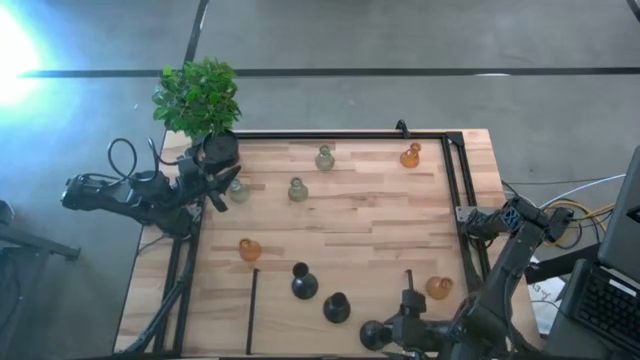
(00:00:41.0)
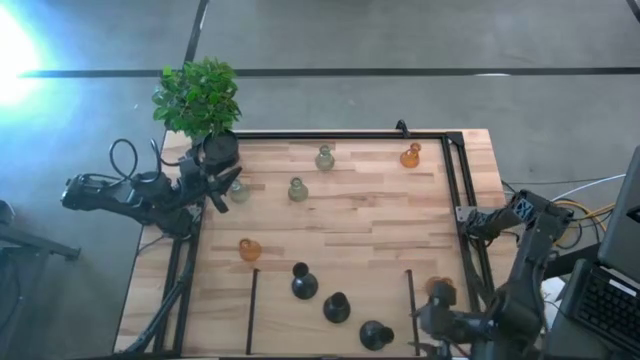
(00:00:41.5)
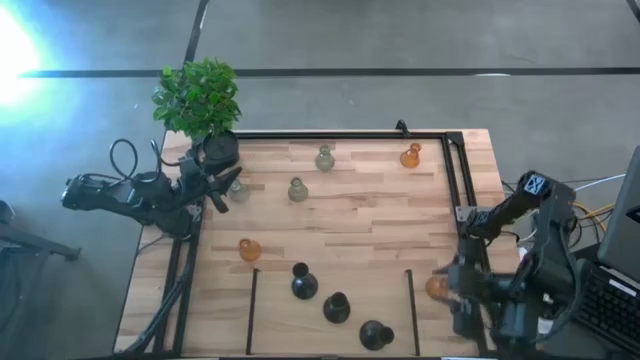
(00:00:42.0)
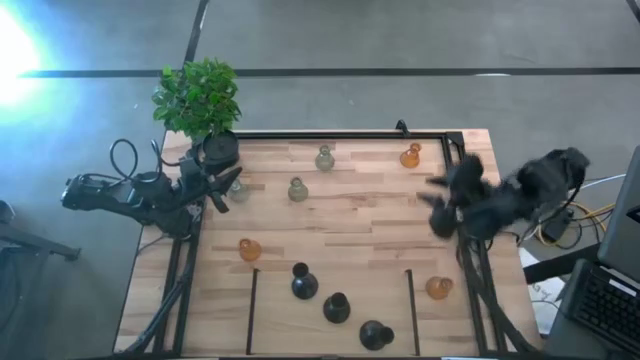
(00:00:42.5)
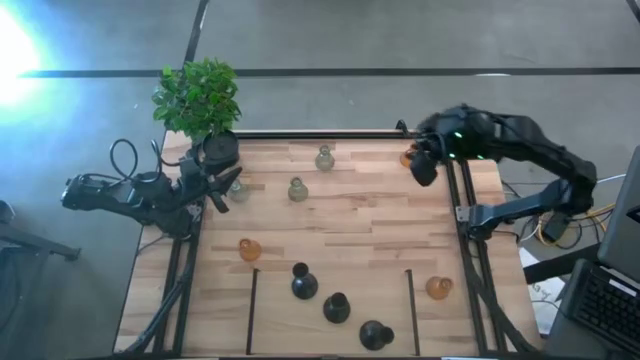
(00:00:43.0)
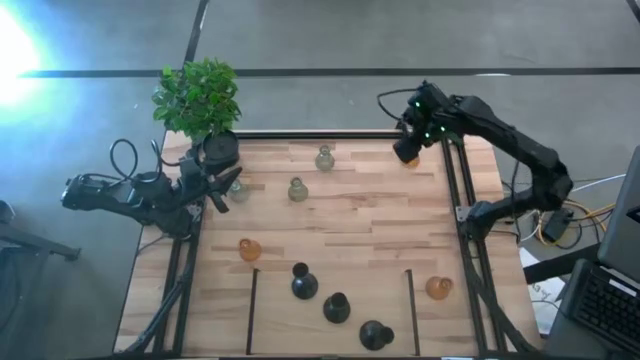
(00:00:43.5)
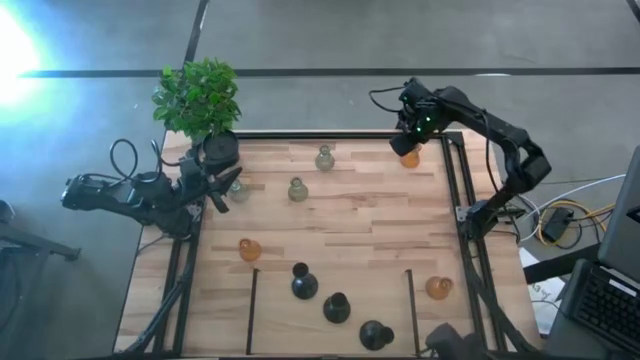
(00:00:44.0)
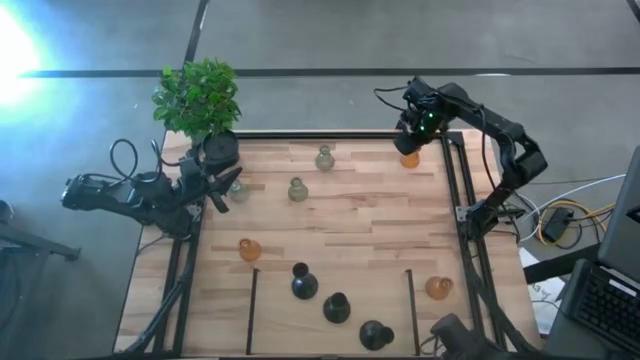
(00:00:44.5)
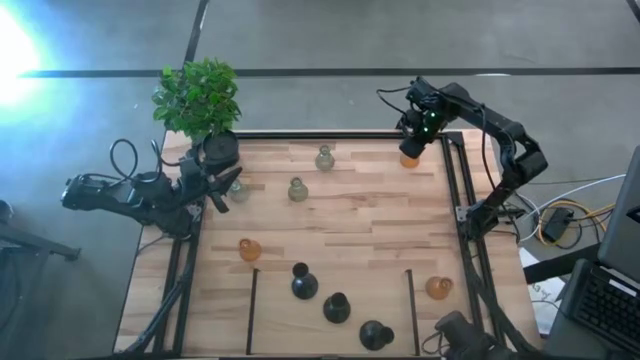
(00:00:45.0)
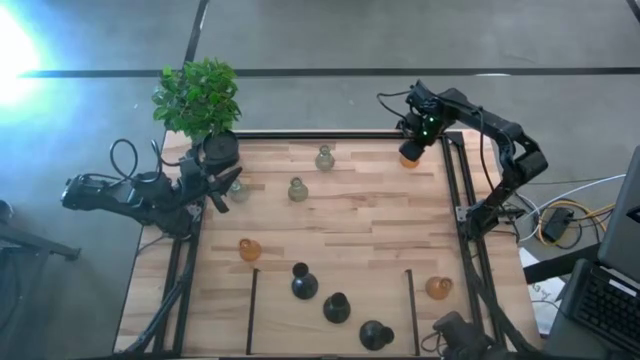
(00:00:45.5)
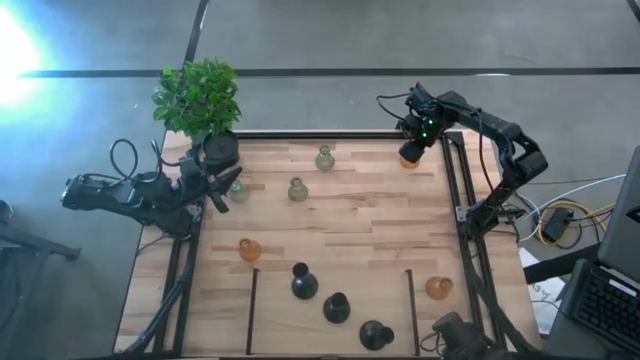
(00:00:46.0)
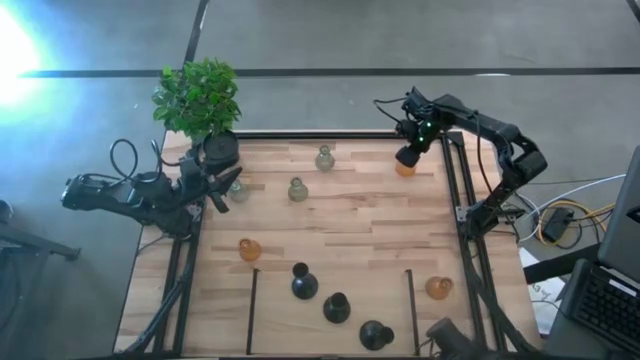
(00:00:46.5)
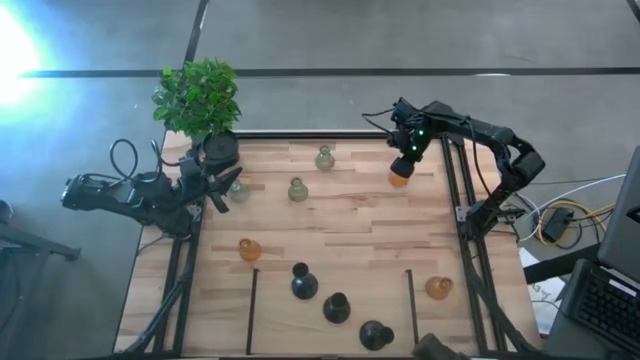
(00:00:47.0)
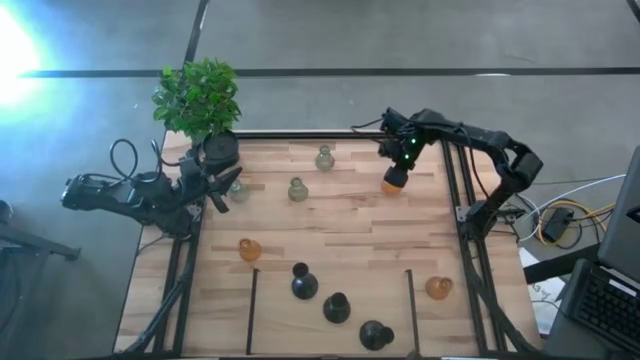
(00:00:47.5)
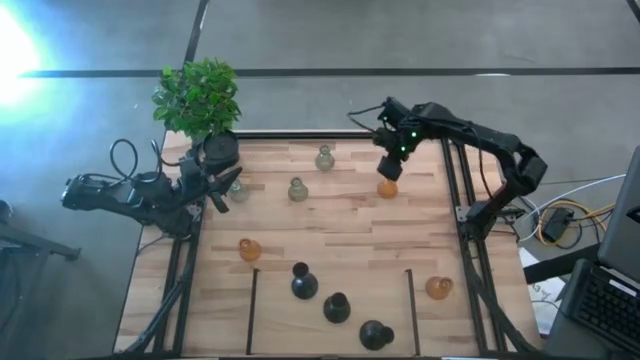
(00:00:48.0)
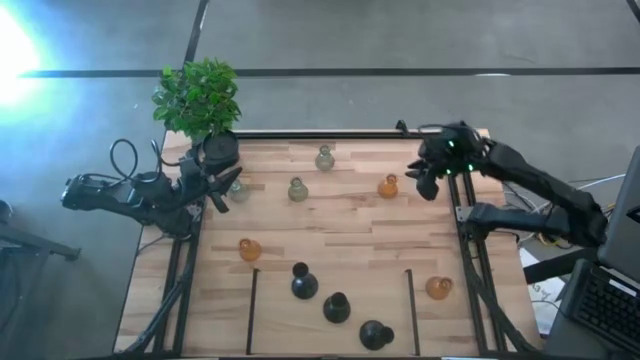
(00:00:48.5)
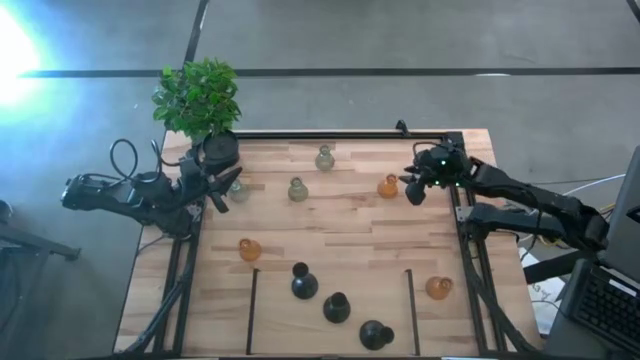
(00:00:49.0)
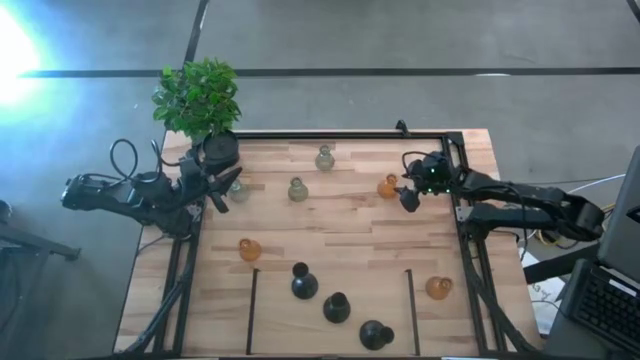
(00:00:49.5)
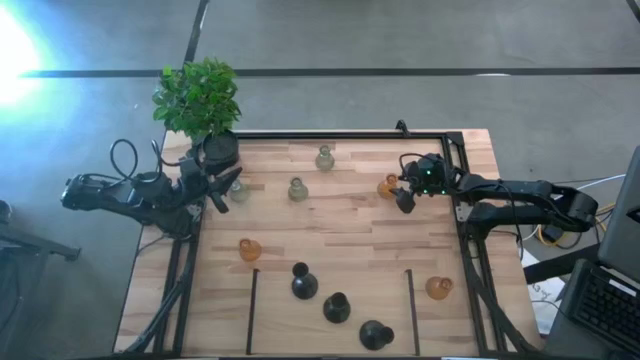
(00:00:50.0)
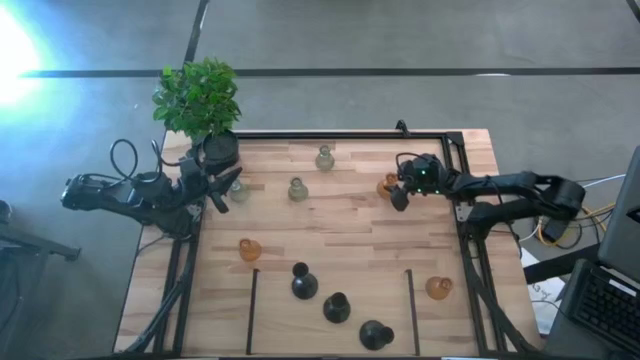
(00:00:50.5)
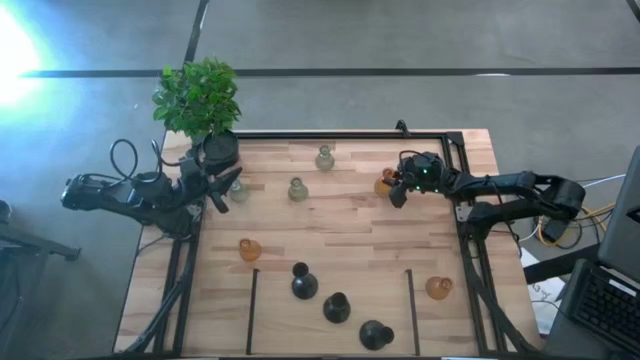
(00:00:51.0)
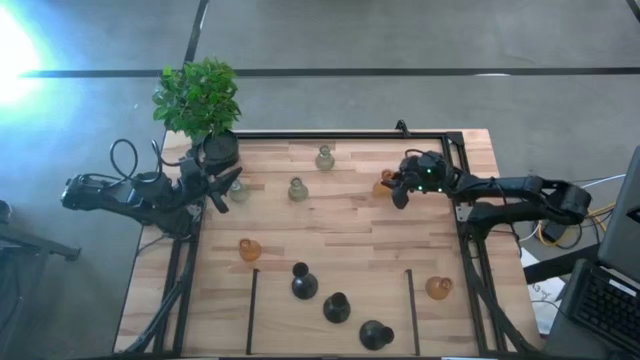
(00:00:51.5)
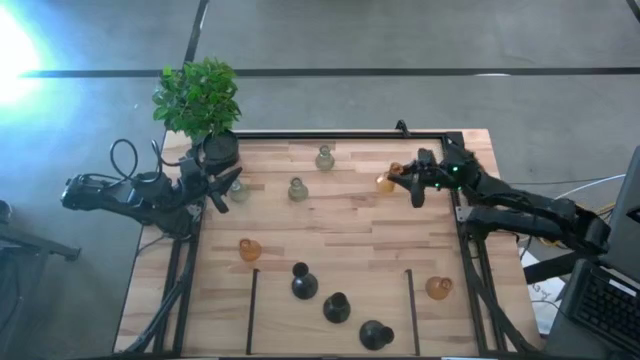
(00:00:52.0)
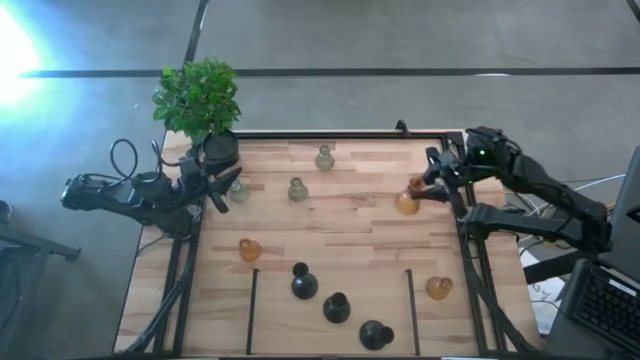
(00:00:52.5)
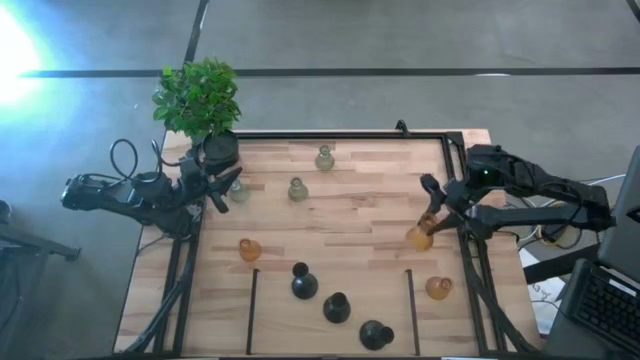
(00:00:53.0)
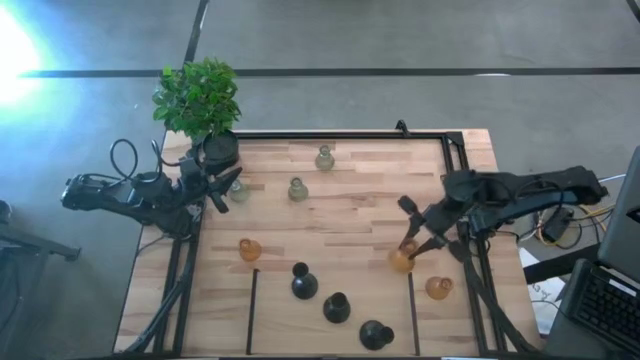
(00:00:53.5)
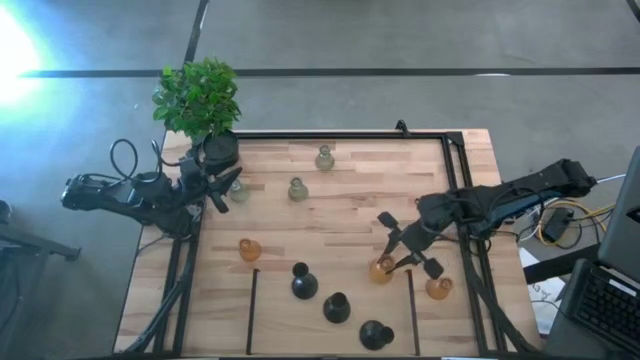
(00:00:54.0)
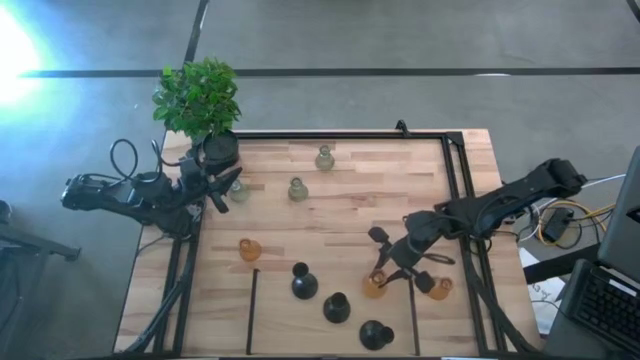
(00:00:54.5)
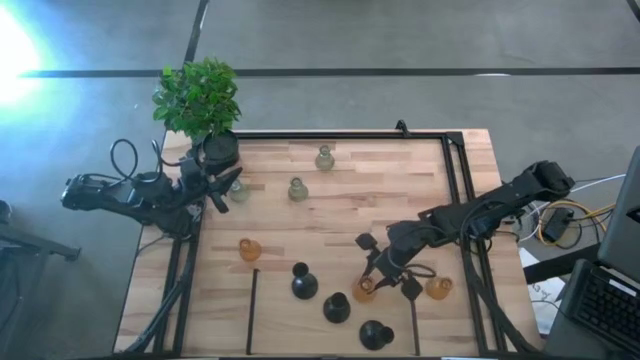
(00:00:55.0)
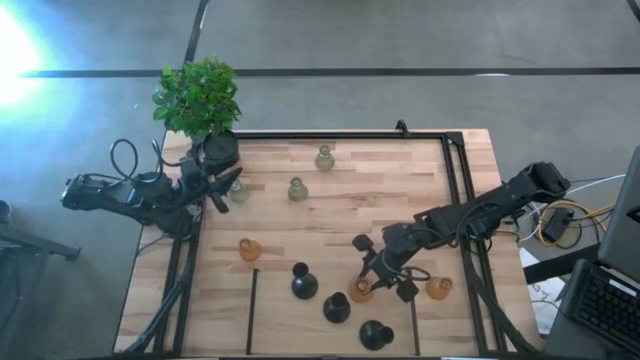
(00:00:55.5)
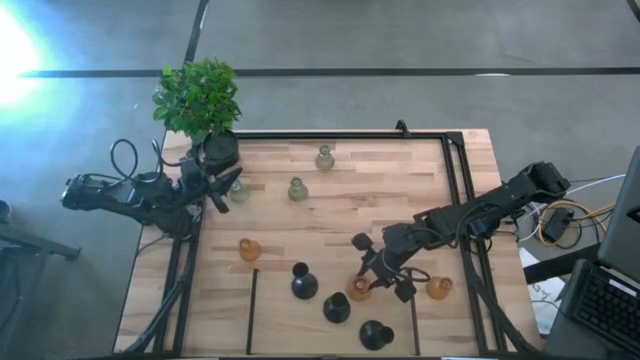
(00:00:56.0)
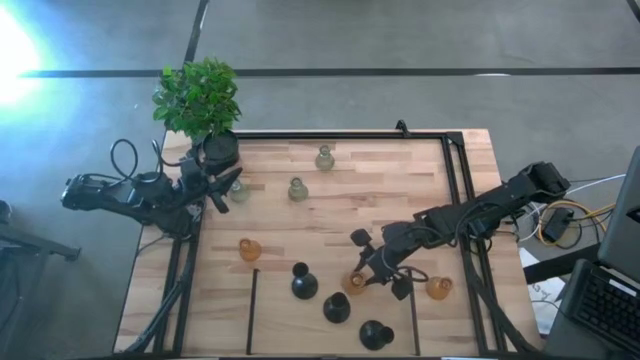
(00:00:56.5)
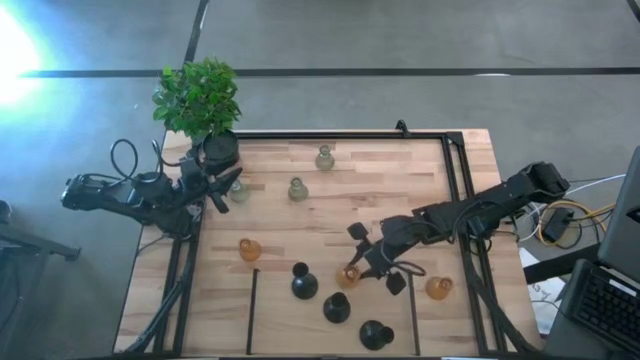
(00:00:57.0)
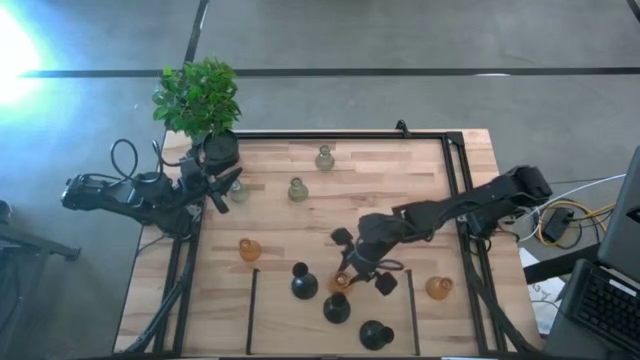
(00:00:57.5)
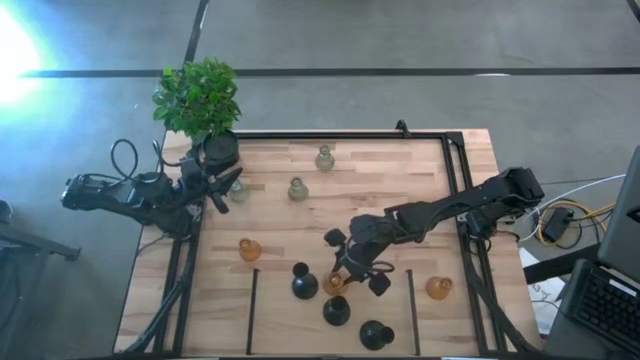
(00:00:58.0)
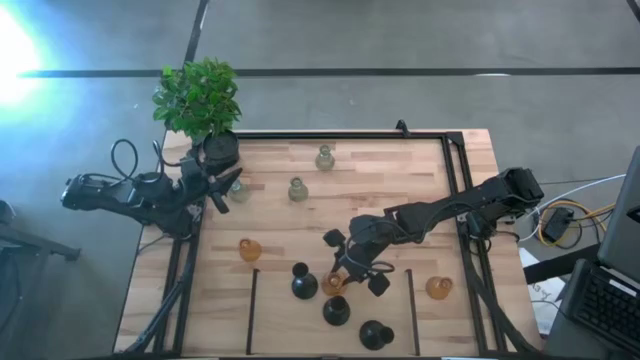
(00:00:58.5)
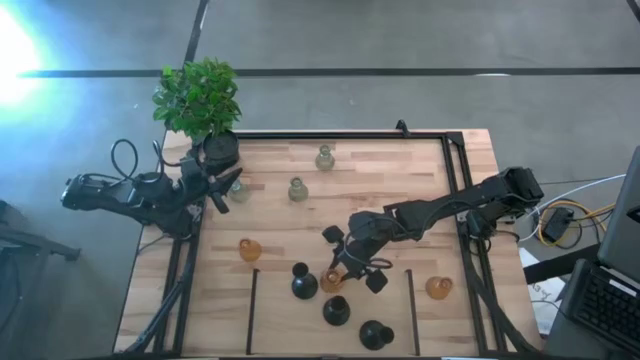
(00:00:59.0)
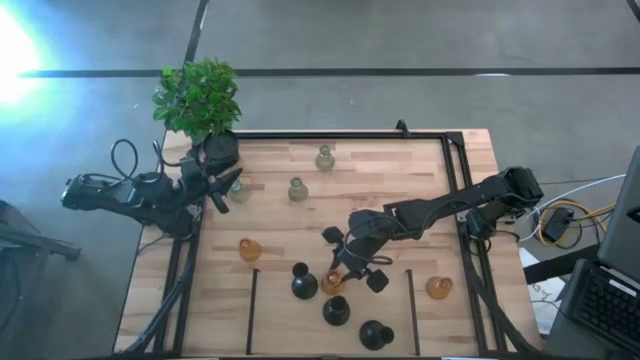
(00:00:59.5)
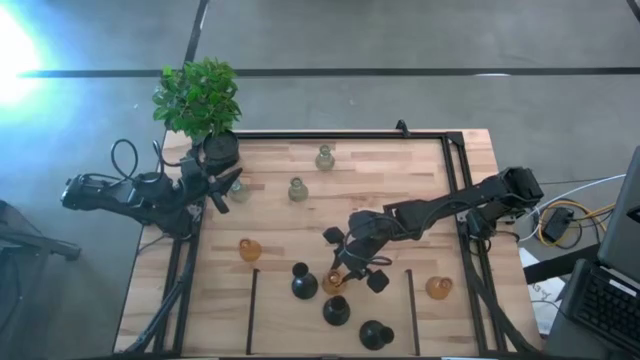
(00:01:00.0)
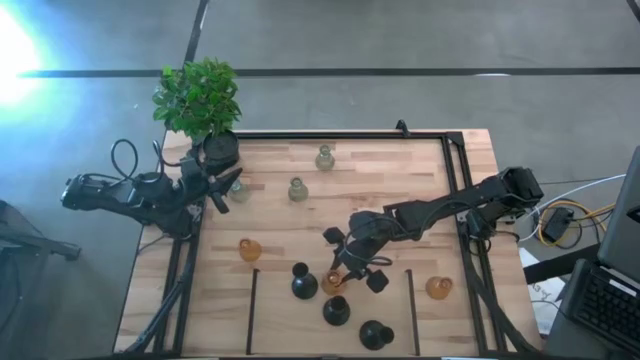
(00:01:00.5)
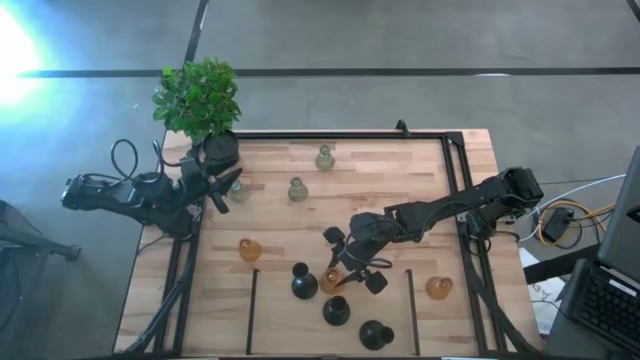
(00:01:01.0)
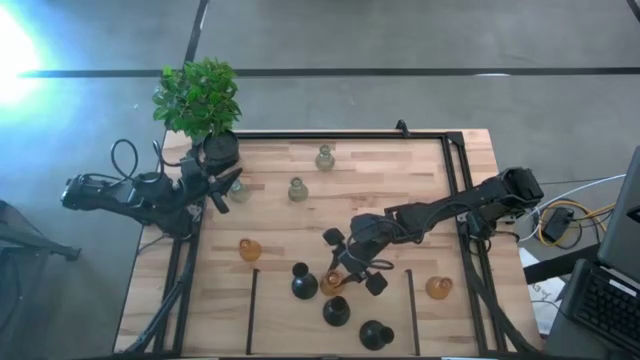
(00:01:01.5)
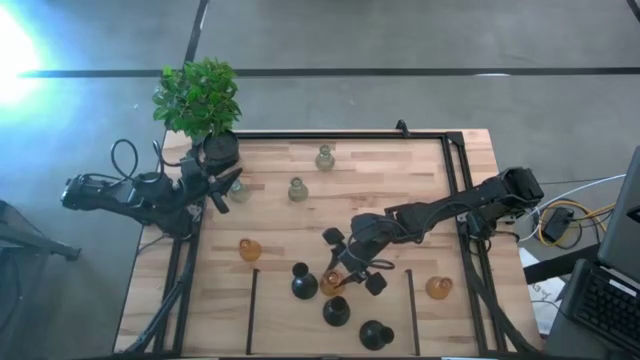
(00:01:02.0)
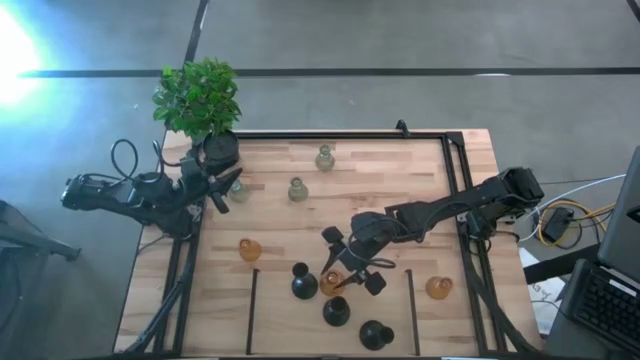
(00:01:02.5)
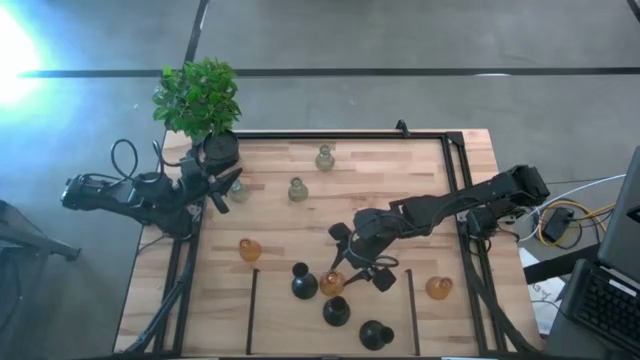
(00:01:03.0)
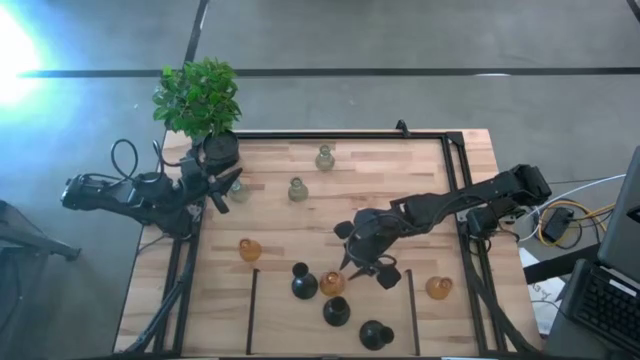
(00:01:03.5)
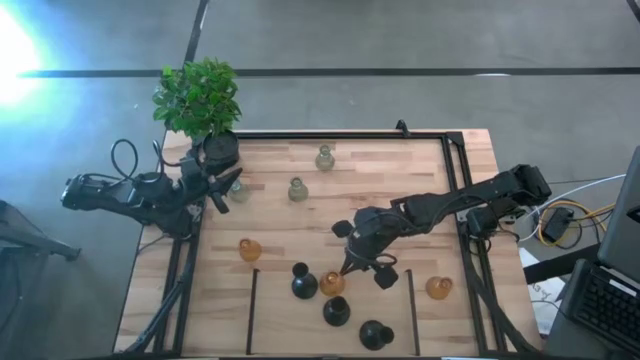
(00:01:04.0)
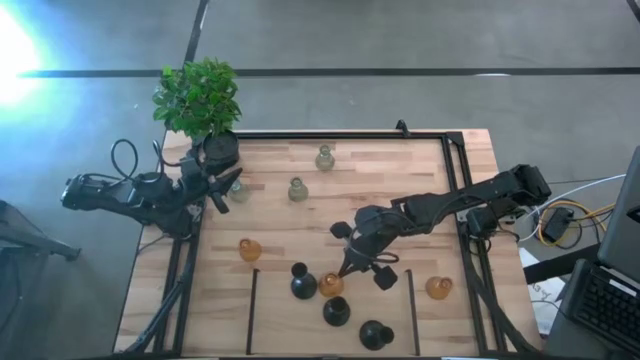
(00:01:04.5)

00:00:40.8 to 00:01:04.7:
Task: Pick & Place candle stick holders
Put the top orange glass candle holder on the shelf
